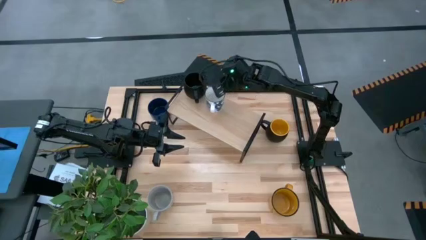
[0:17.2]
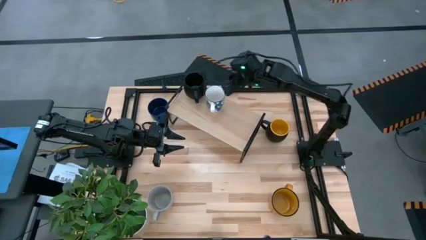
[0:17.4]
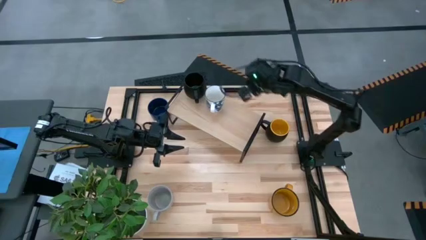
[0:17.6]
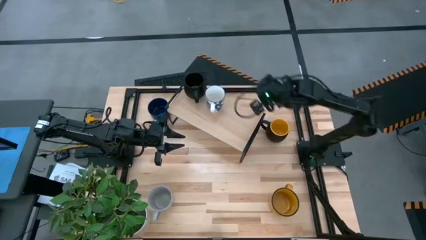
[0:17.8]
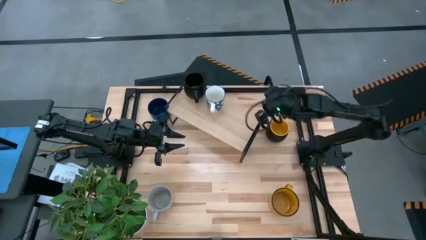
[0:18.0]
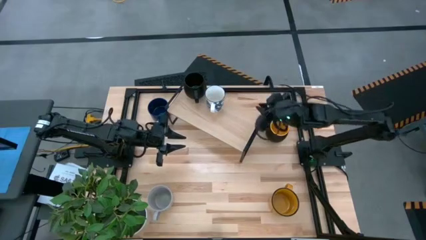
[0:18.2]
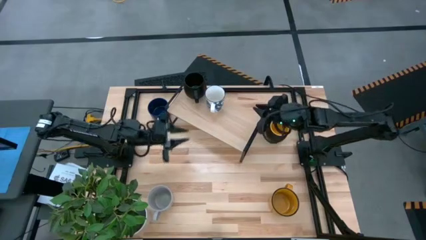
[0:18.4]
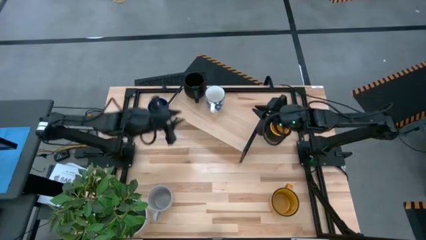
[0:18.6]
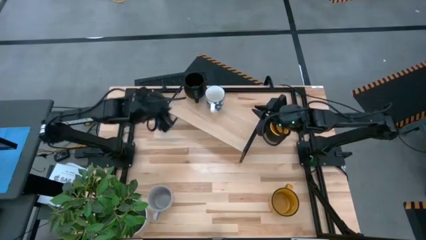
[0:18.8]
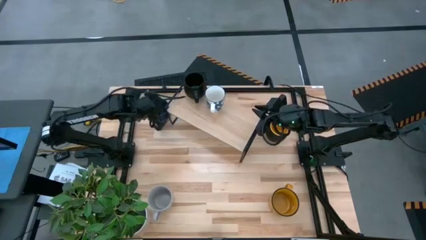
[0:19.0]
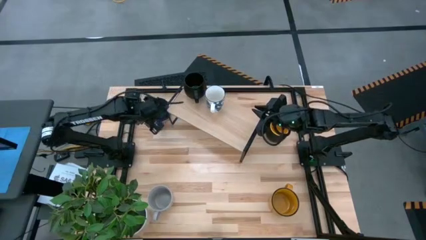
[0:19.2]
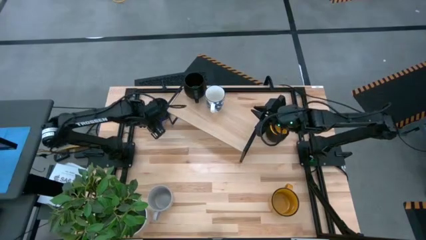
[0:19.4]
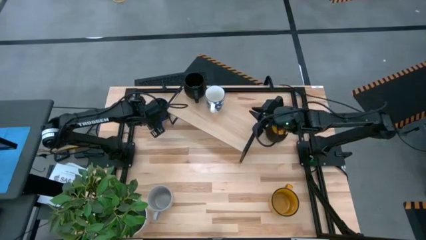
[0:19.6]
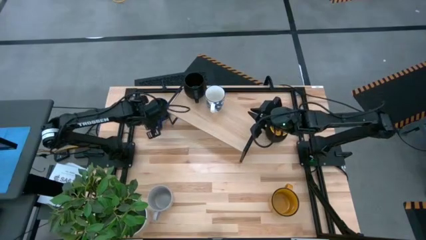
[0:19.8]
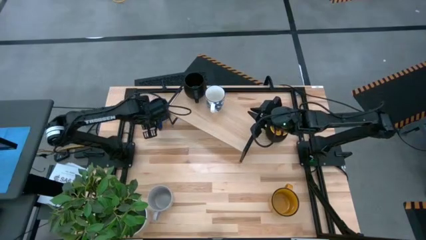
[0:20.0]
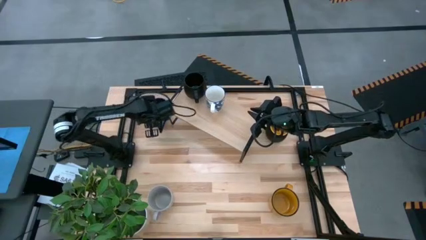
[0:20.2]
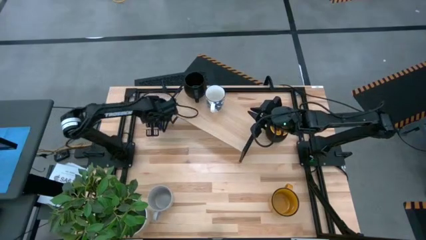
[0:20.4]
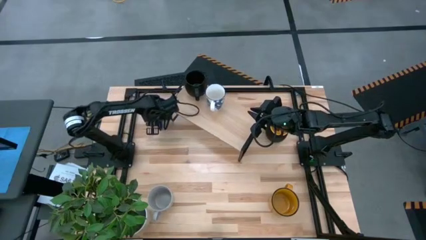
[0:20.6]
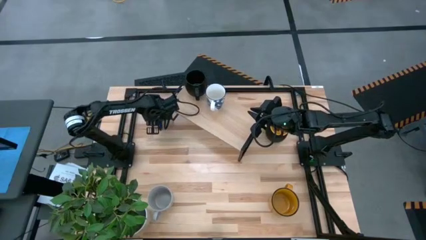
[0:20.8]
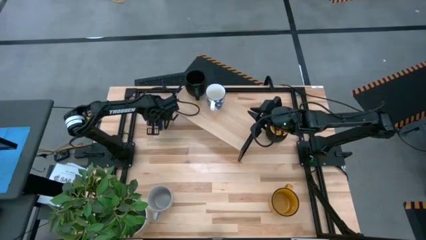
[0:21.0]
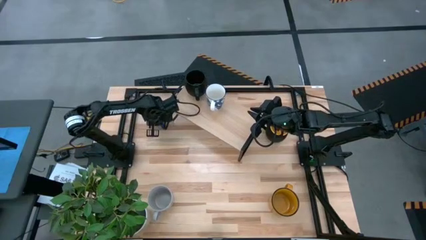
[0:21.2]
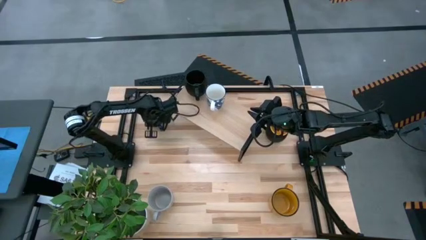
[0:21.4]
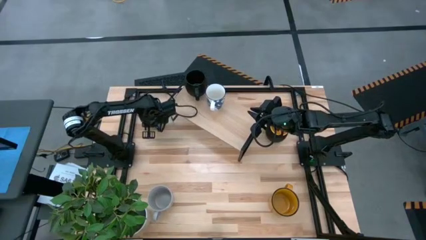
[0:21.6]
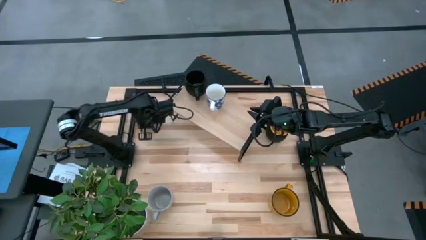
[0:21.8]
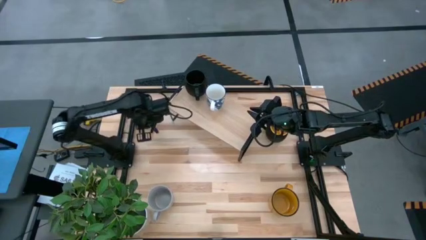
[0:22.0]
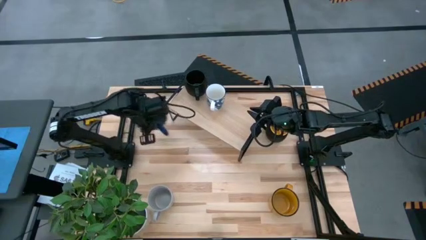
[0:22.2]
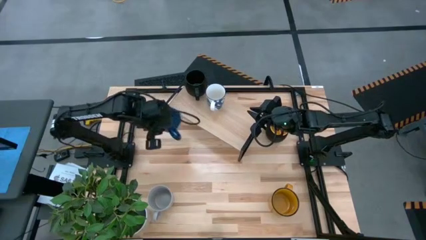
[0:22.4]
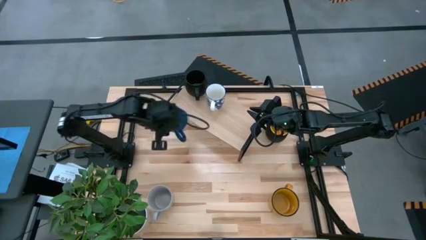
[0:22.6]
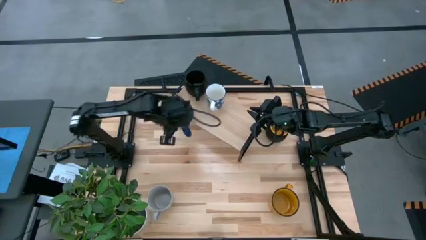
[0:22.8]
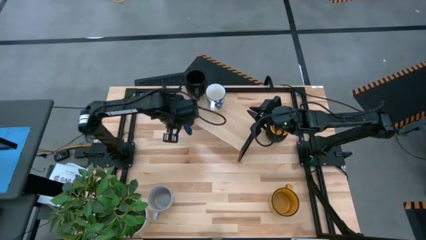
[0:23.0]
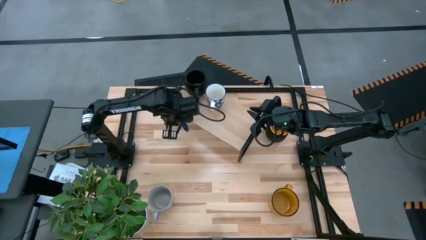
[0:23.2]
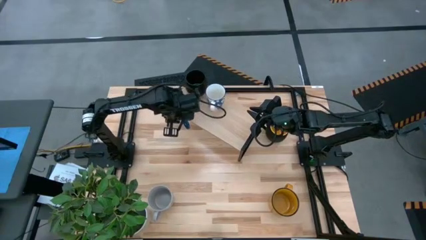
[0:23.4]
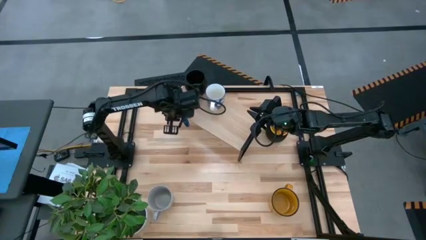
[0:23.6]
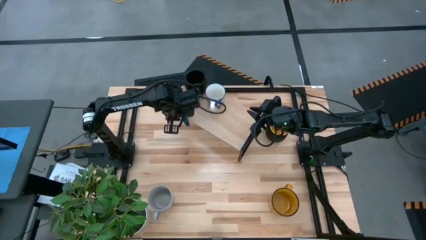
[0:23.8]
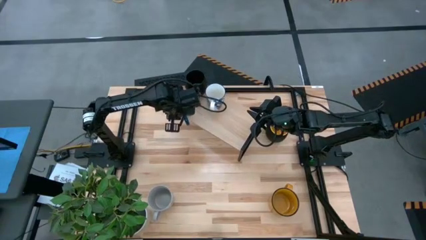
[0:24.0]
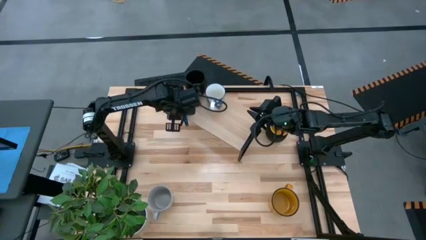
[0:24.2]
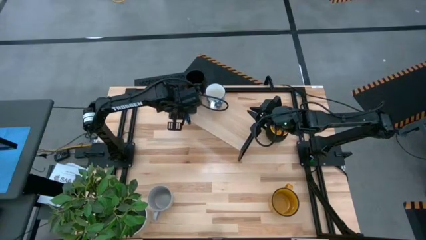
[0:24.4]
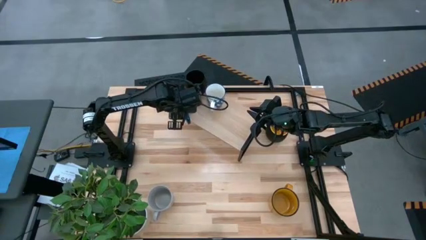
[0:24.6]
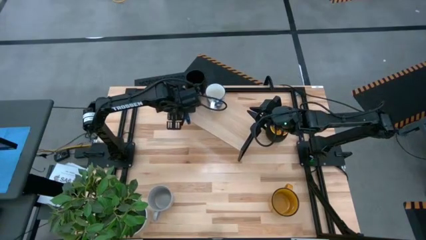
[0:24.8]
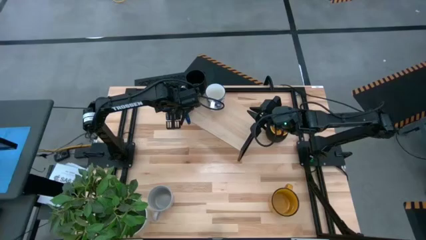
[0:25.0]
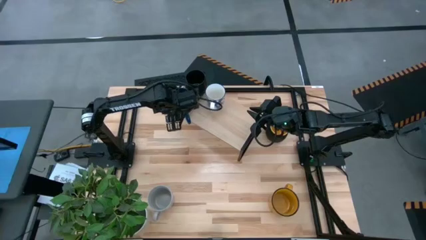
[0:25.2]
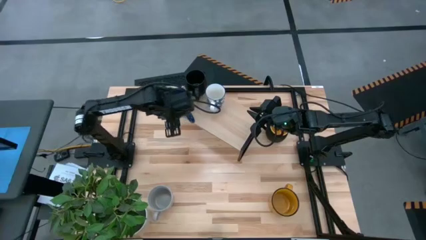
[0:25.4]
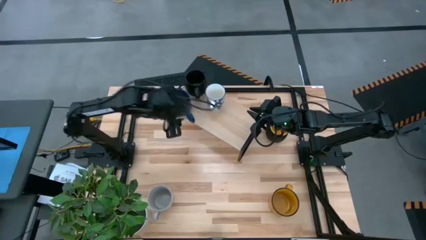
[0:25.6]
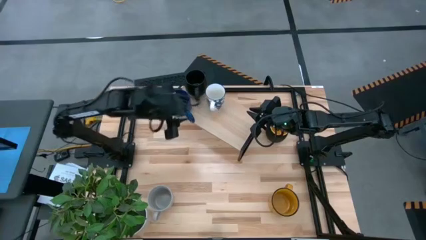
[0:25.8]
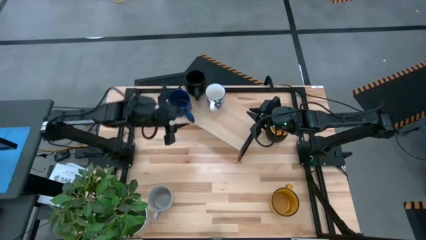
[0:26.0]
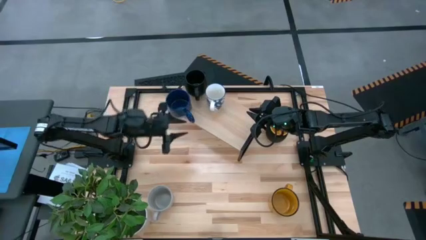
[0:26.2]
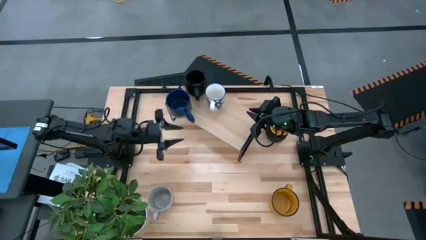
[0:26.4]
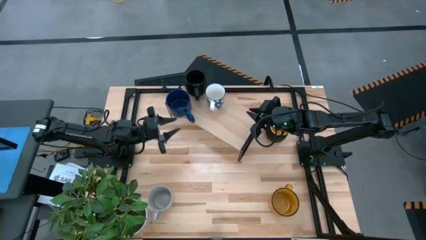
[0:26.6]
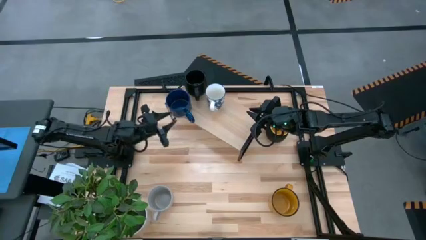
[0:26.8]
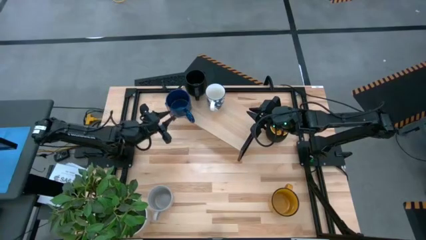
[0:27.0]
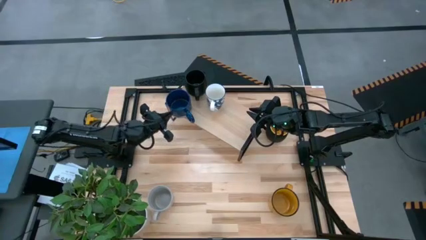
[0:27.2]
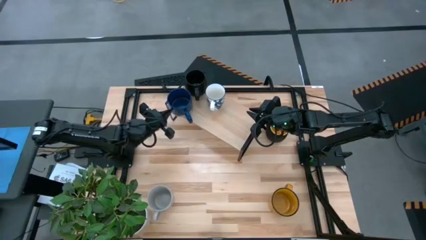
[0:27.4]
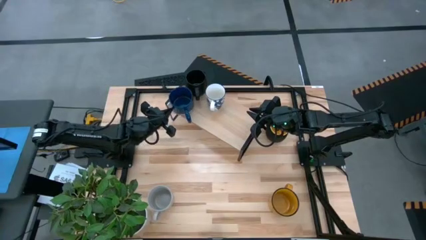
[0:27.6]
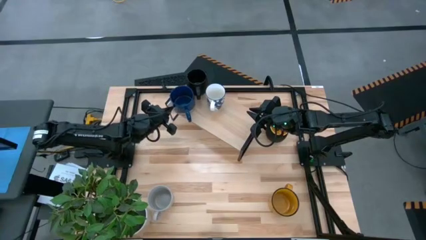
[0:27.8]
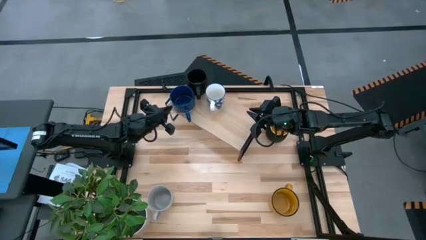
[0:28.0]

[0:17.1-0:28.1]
Task: Place coffee mugs
Put the blue mug on the shelf

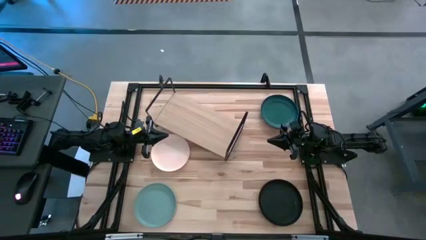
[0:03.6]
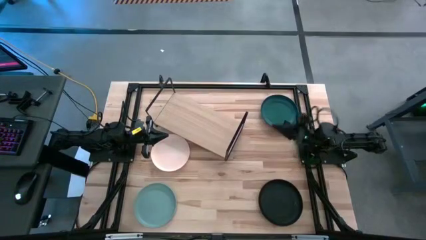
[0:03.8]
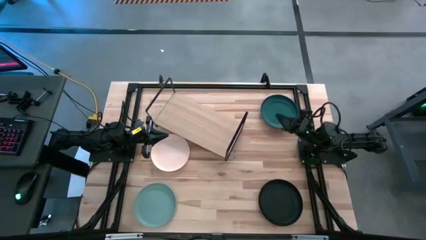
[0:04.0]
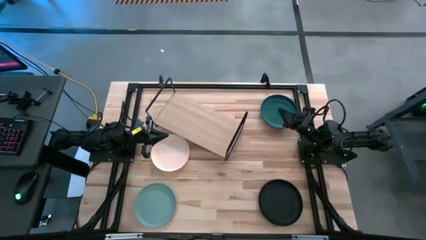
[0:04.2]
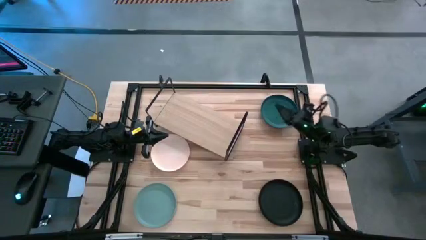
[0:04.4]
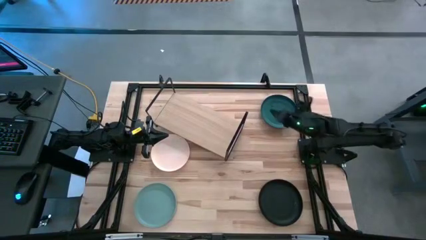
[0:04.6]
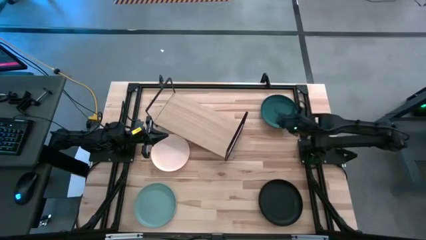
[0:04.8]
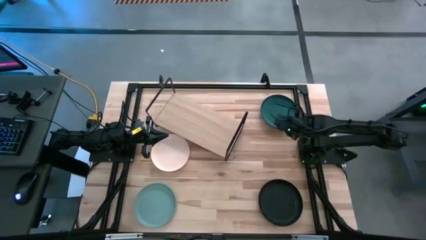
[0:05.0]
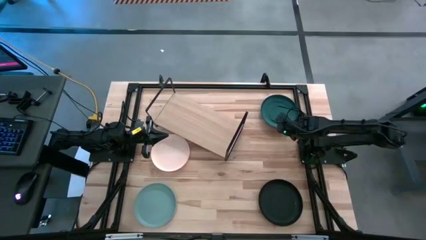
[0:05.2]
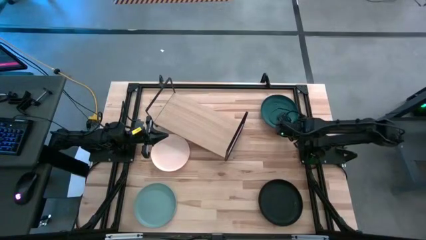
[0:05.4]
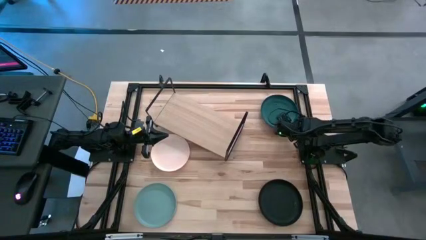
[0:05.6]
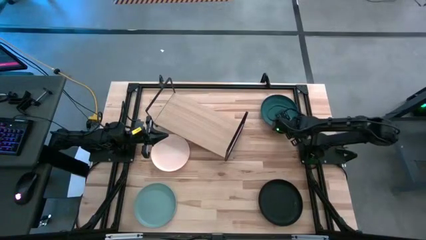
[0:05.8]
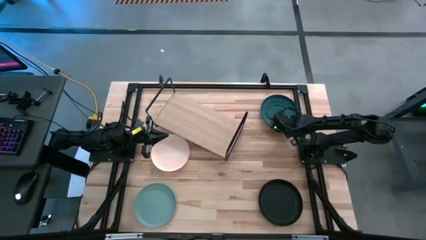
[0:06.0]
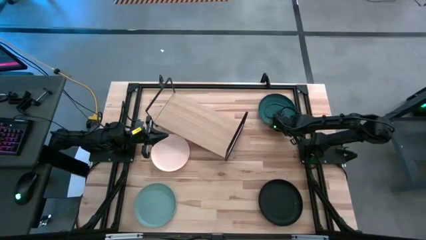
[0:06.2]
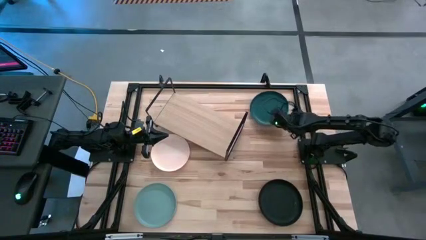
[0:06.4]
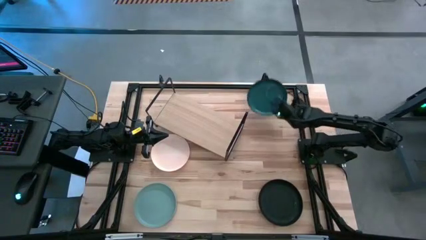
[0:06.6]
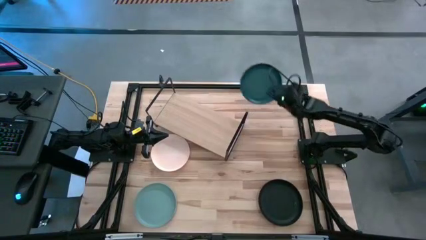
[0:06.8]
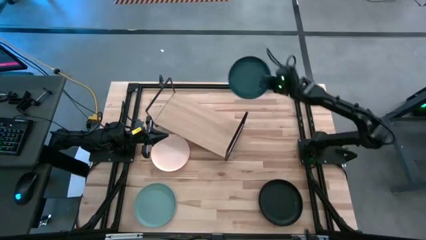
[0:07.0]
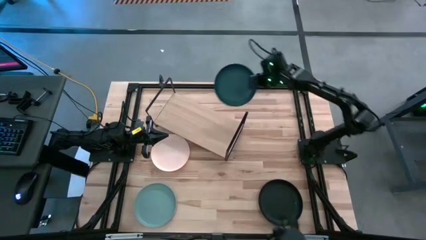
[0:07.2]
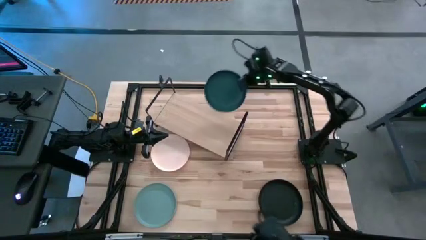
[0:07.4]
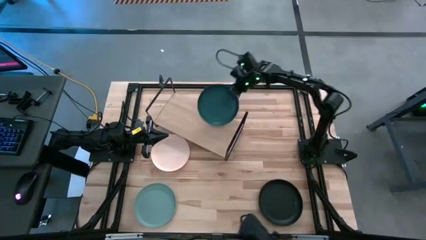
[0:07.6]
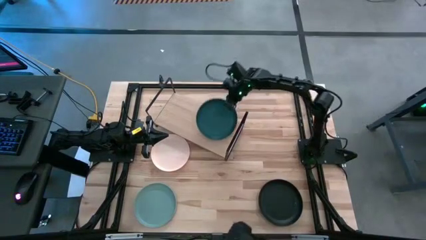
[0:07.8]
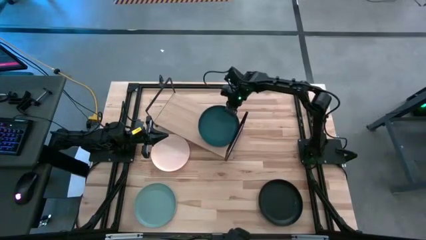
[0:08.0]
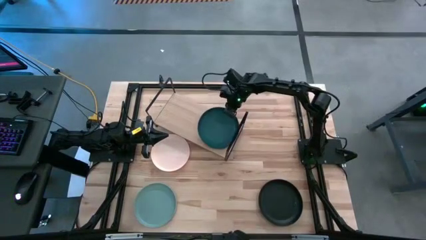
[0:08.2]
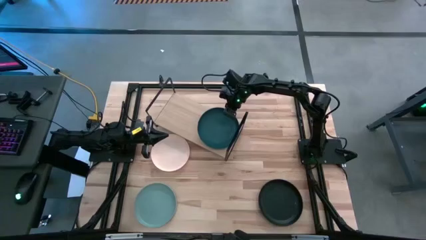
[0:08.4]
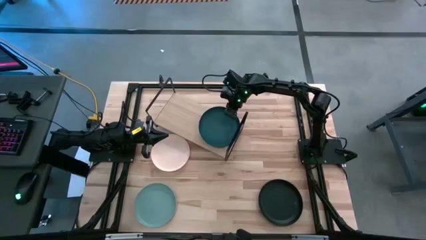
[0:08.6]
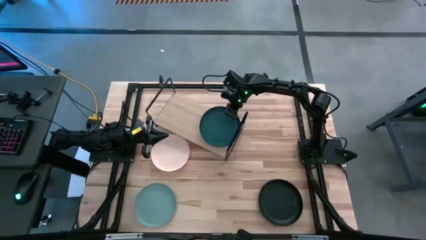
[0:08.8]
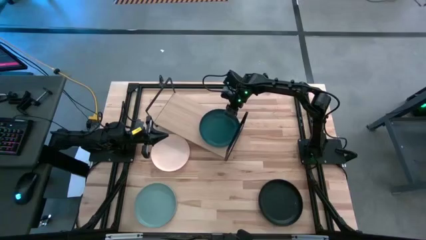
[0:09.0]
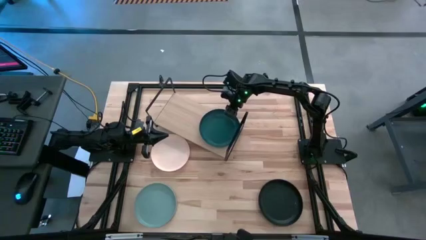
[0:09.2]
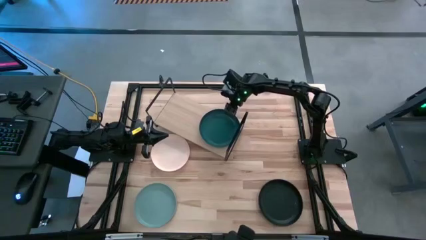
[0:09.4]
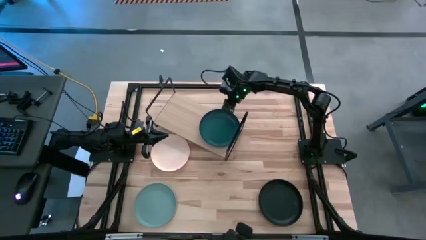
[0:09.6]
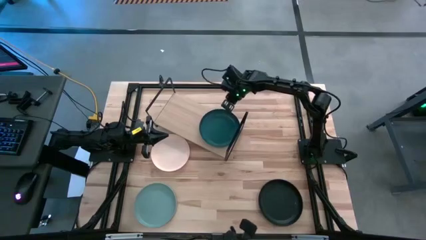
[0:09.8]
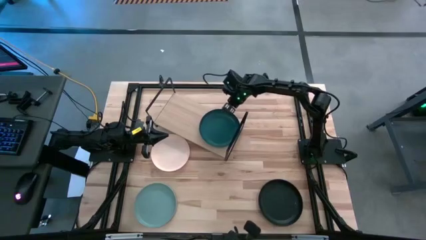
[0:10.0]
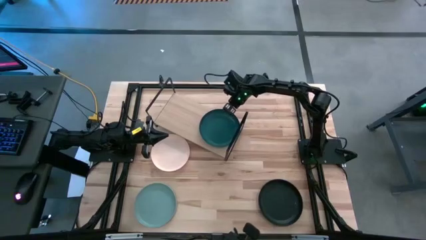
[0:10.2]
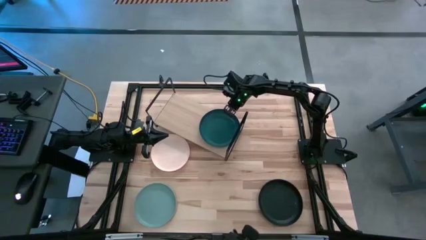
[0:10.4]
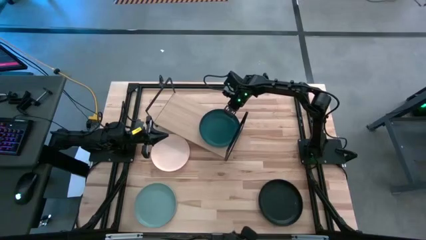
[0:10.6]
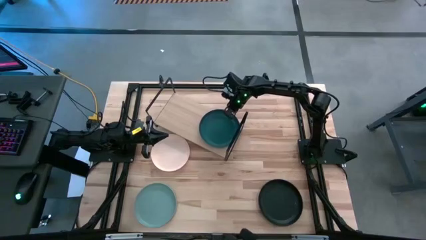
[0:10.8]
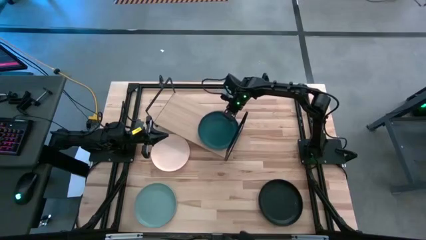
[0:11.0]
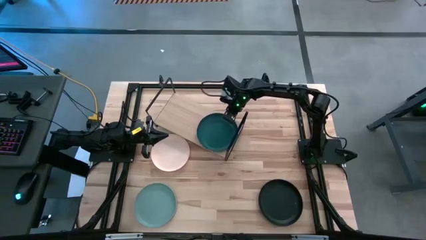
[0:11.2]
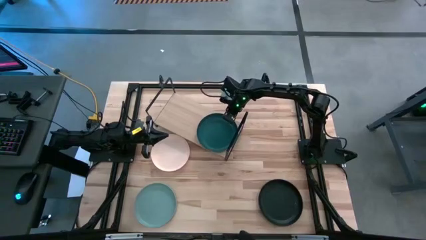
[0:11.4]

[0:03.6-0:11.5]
Task: Place and stack plates onto a shelf
Put the green plate on the shelf
